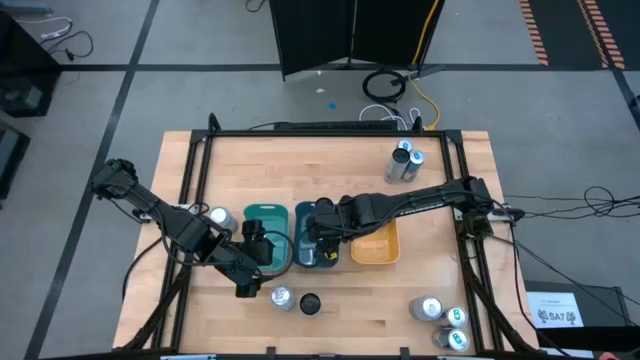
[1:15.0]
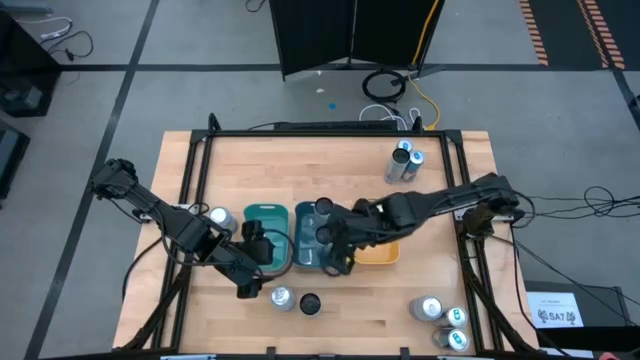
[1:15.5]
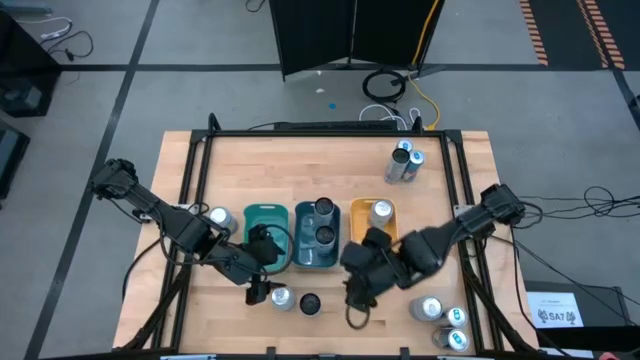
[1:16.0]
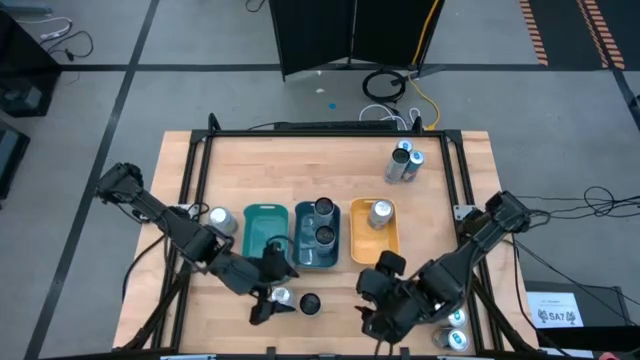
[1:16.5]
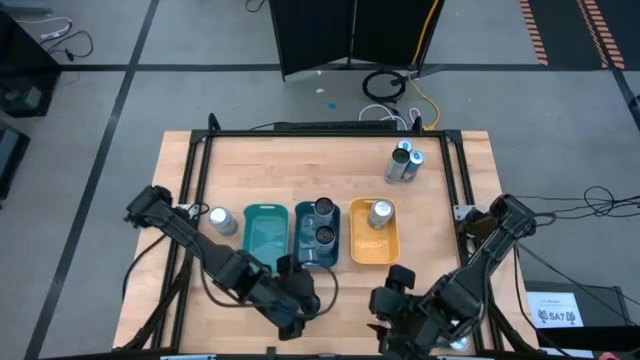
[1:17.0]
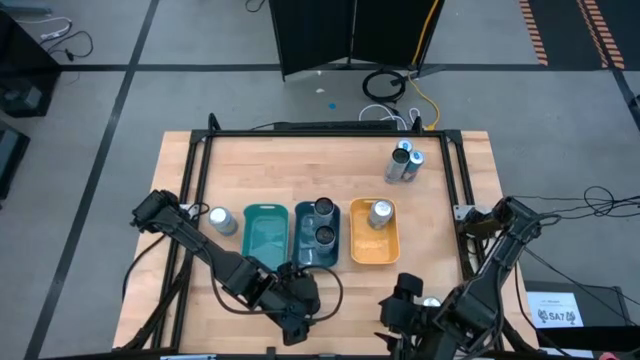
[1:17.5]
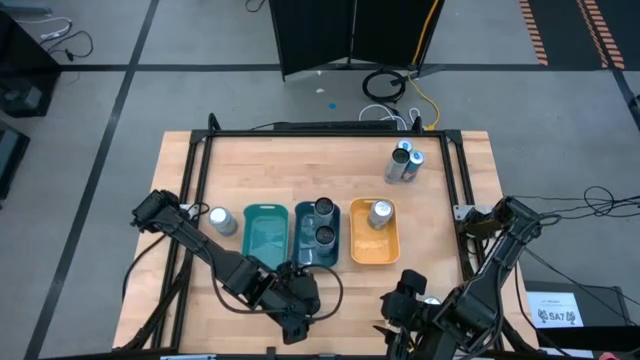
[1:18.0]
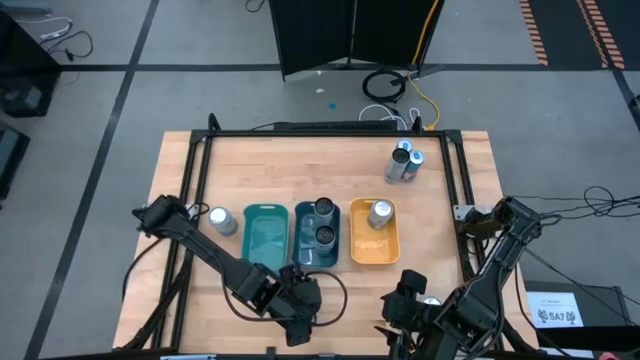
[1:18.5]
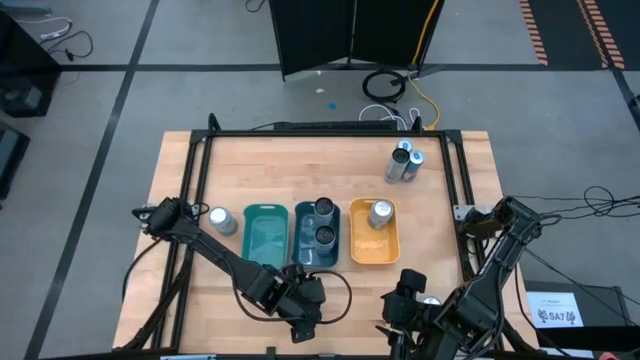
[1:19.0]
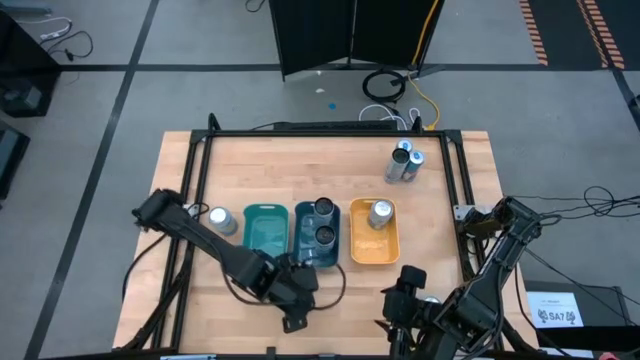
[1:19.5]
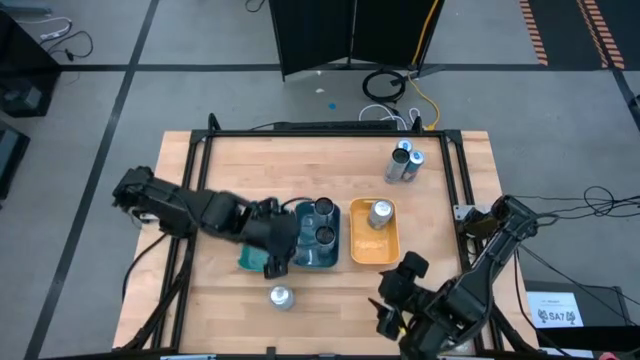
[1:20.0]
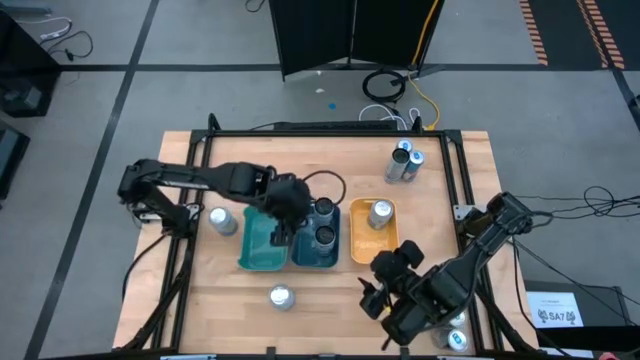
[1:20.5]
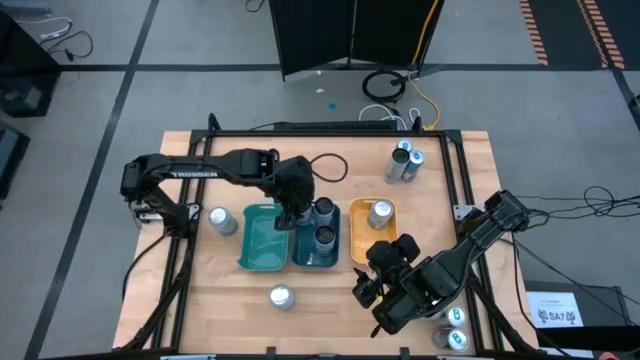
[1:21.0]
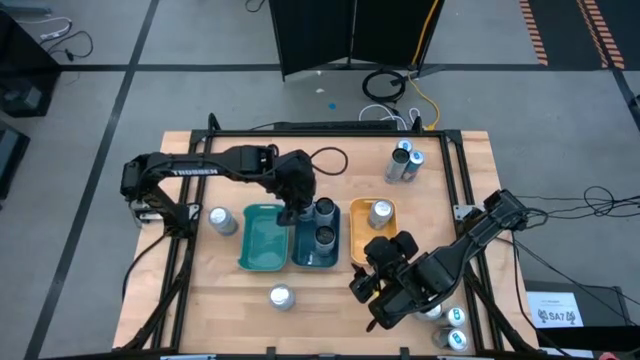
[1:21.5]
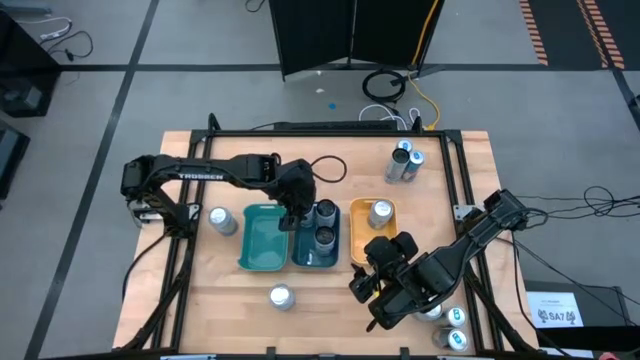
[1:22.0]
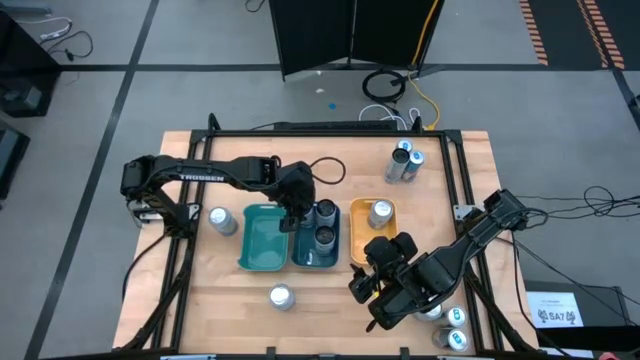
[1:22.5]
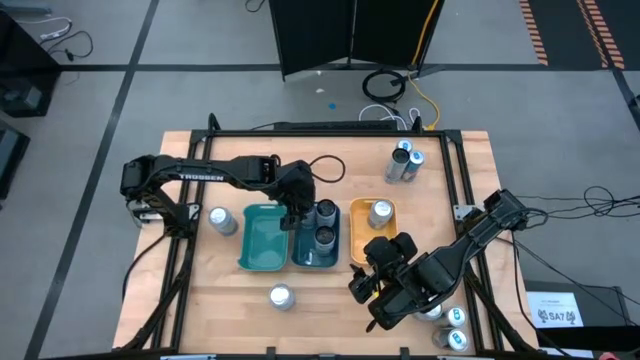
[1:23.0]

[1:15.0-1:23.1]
Task: Sort soda cans
Put the black soda can into the blue bin

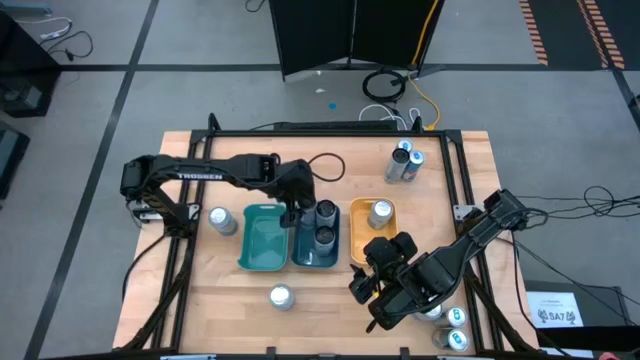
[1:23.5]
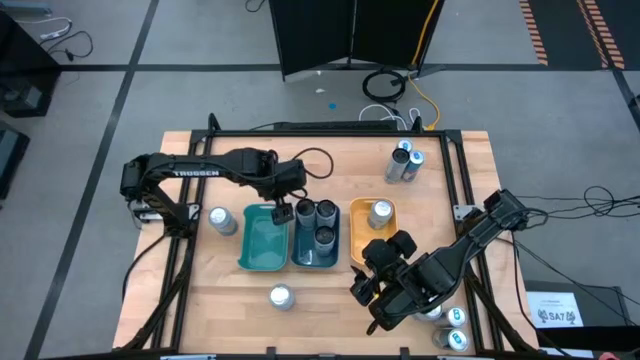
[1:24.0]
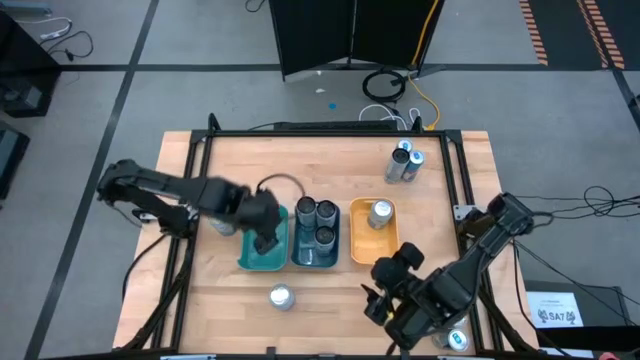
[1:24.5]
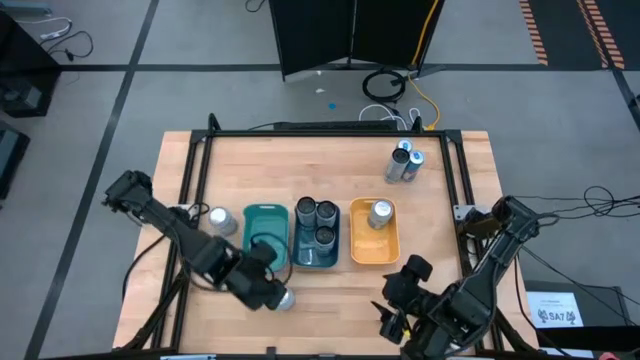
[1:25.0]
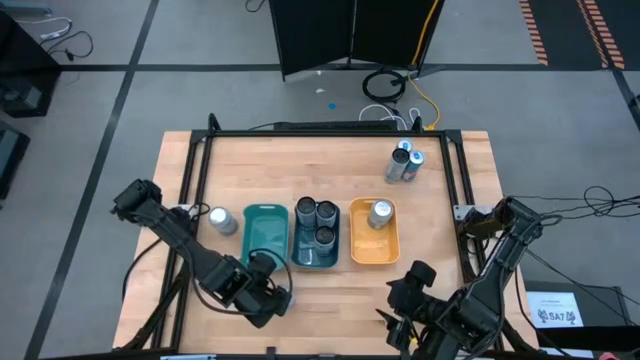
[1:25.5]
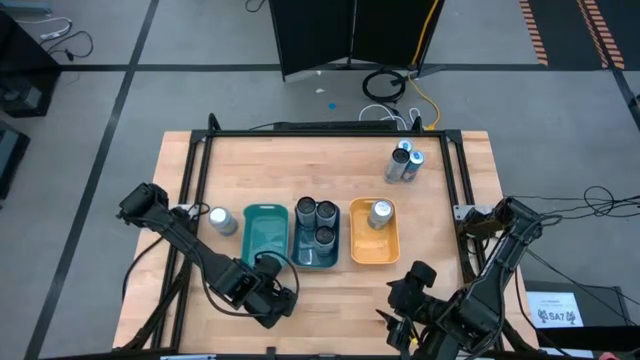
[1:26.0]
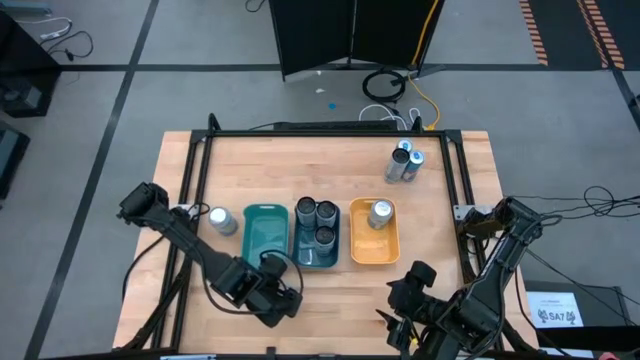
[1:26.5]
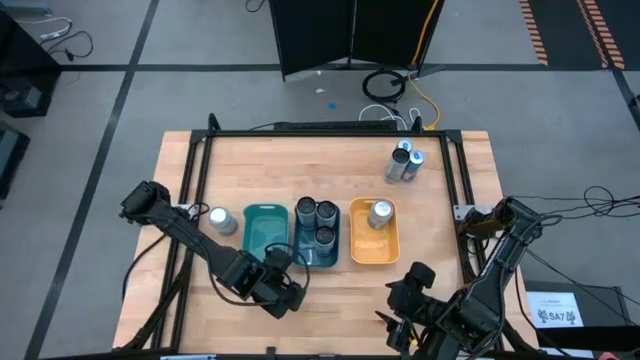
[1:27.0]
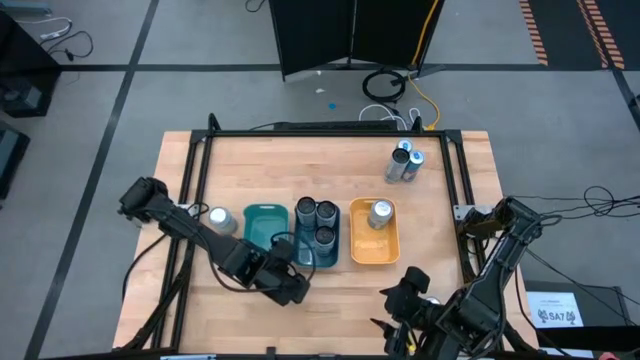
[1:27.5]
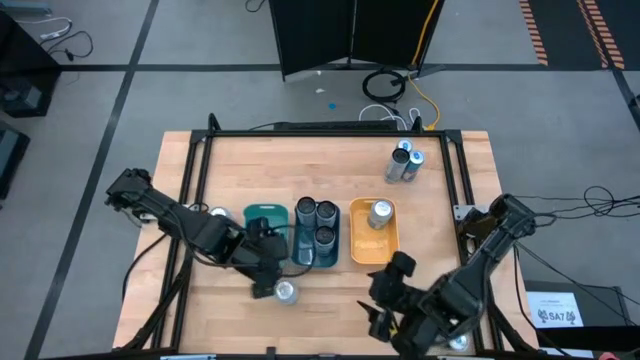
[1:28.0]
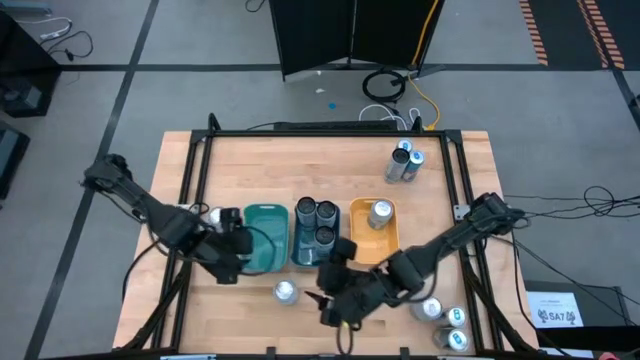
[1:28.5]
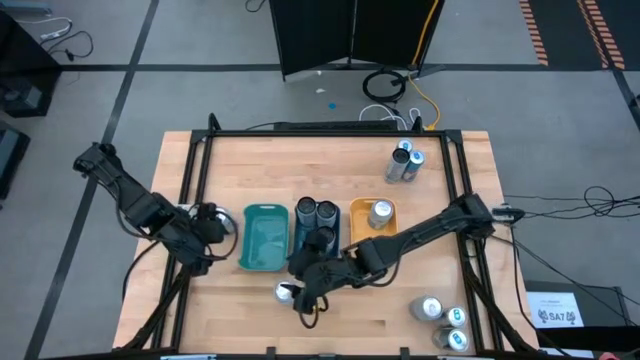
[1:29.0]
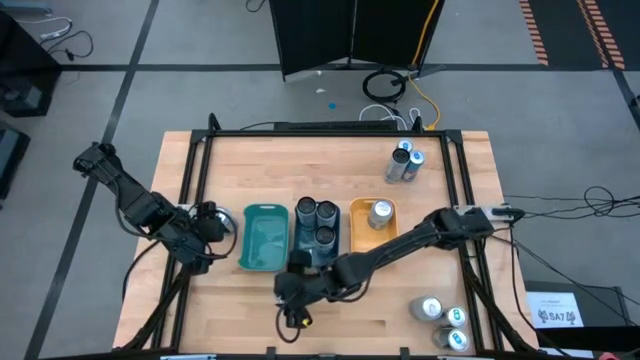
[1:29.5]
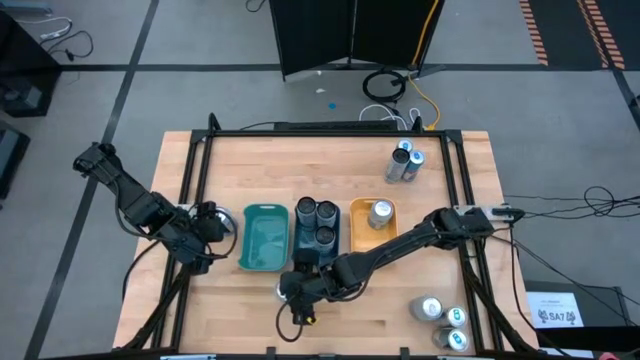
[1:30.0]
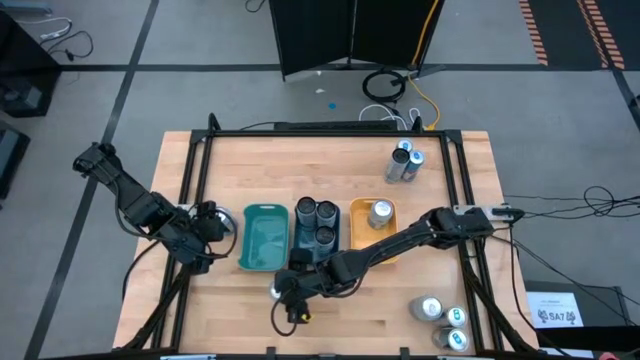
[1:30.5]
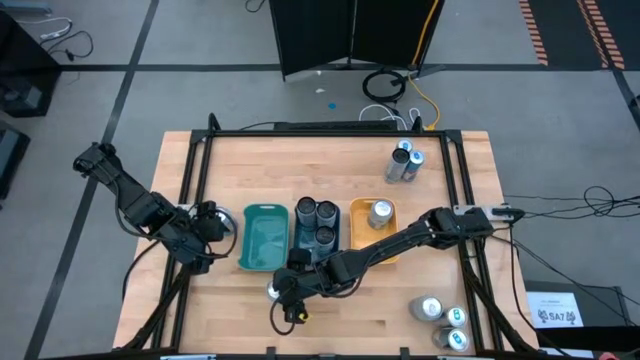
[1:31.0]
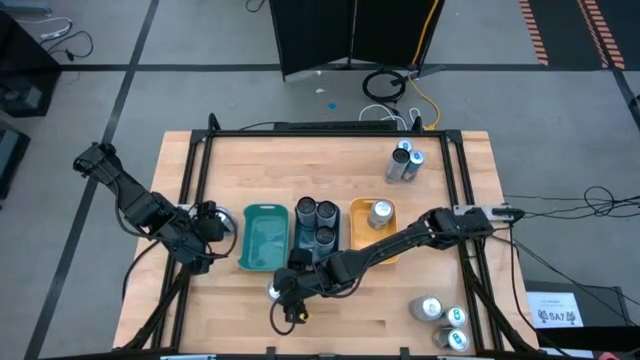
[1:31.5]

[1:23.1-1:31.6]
Put the bottom left silver soda can into the yellow bin

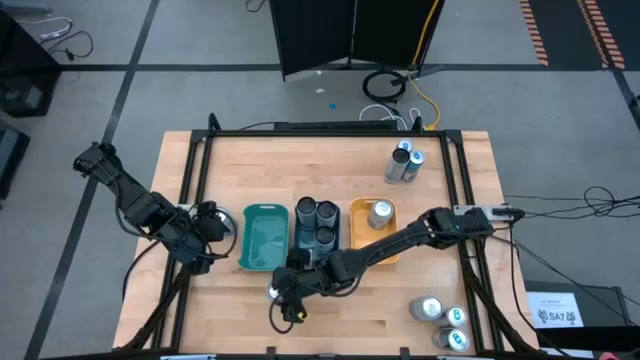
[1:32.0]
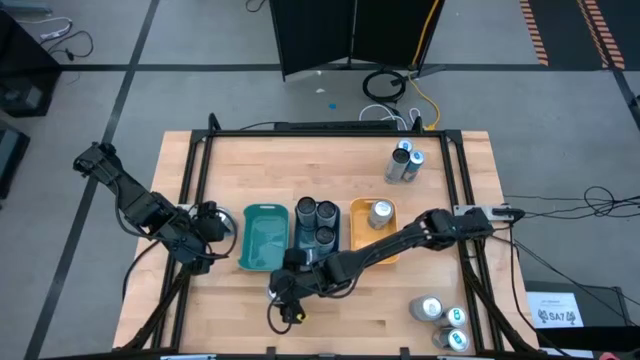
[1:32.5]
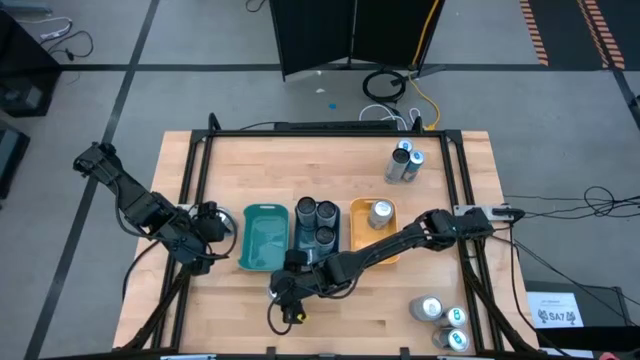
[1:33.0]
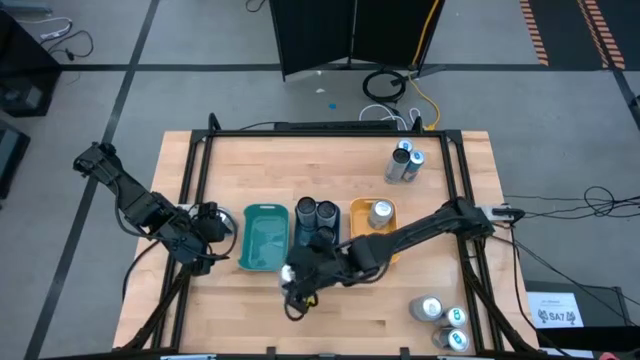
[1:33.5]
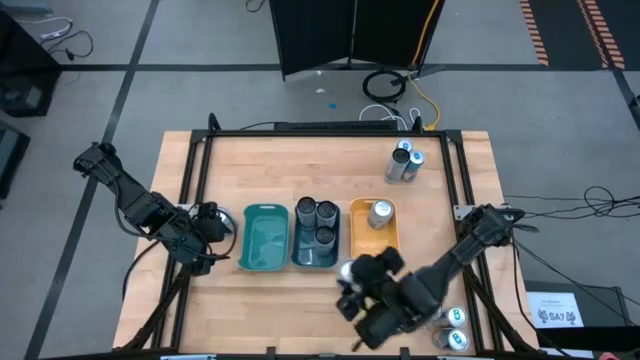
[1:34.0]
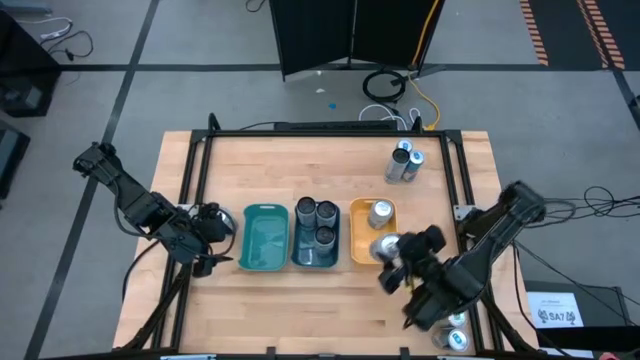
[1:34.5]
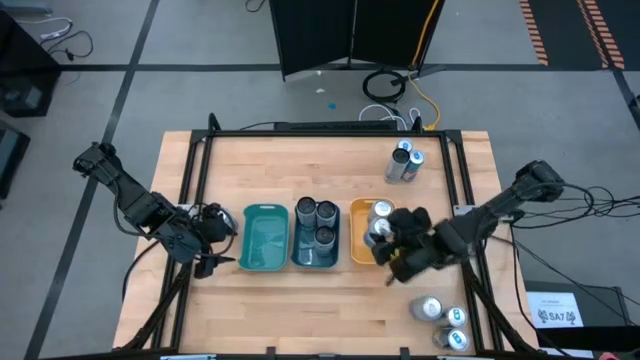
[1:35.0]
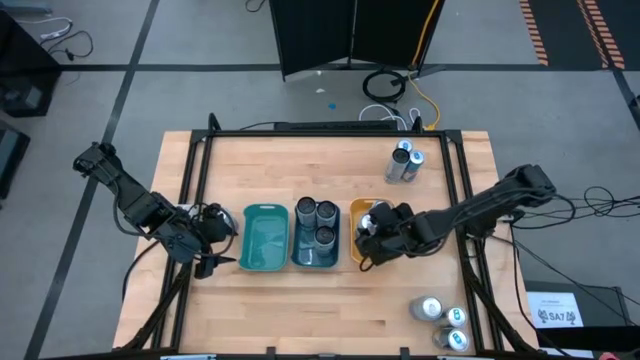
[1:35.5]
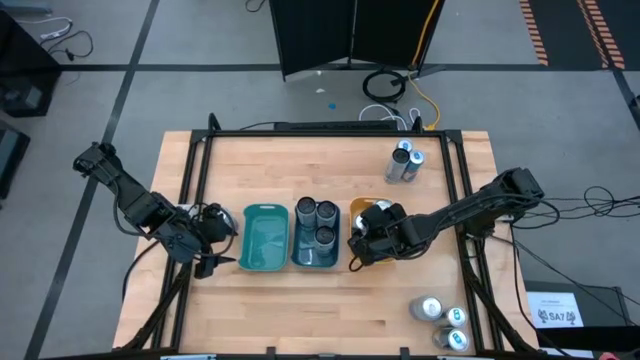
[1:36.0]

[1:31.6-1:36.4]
Put the bottom left silver soda can into the yellow bin
